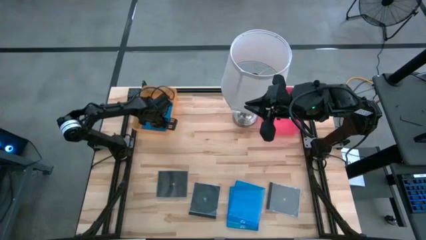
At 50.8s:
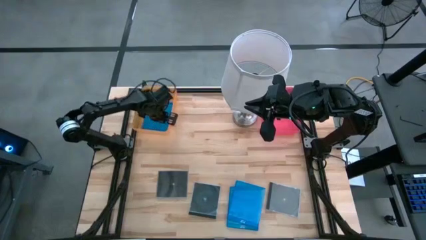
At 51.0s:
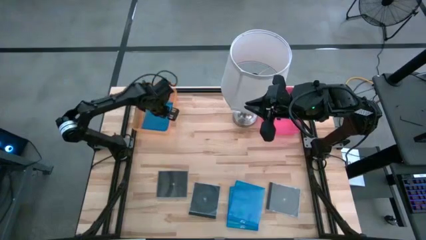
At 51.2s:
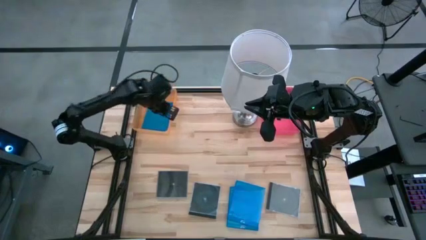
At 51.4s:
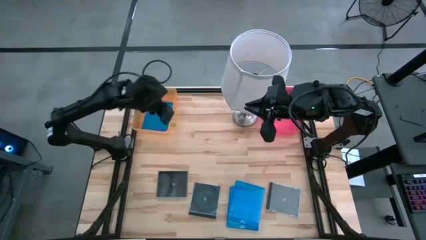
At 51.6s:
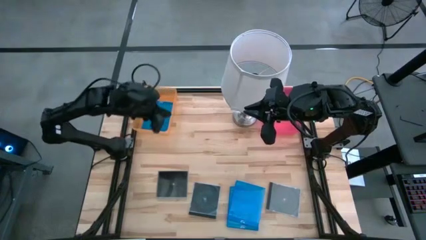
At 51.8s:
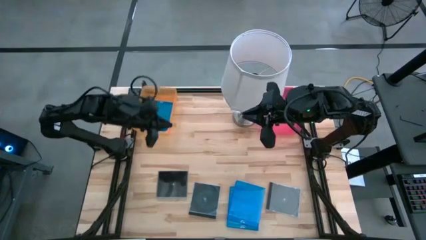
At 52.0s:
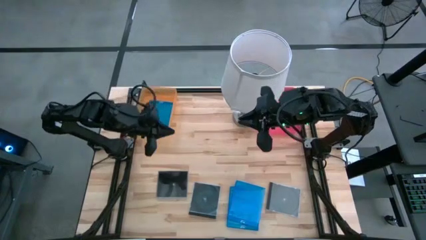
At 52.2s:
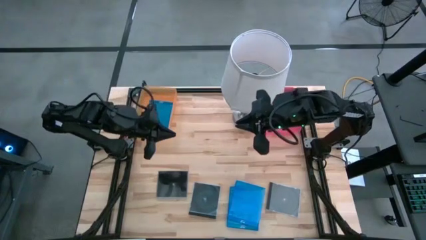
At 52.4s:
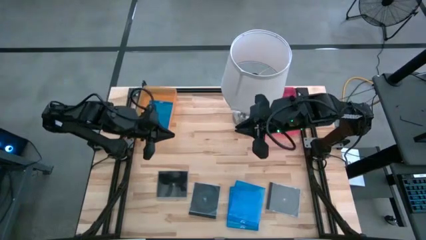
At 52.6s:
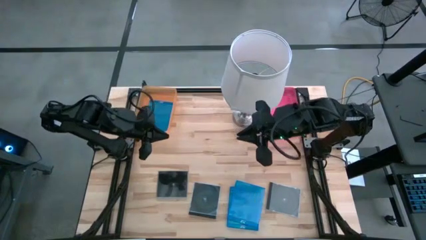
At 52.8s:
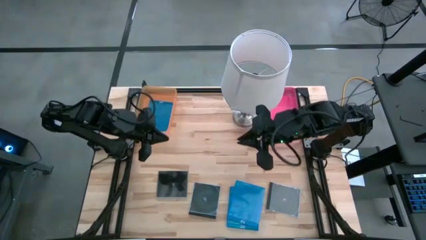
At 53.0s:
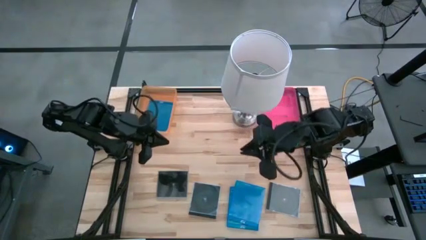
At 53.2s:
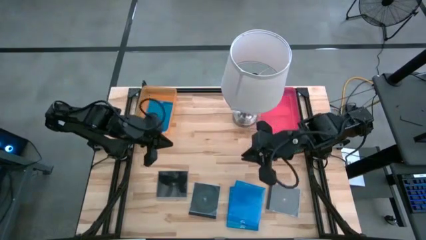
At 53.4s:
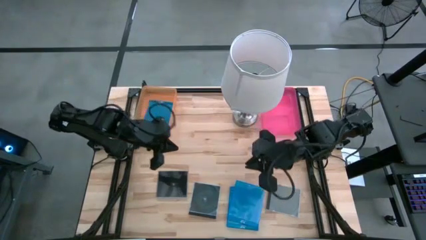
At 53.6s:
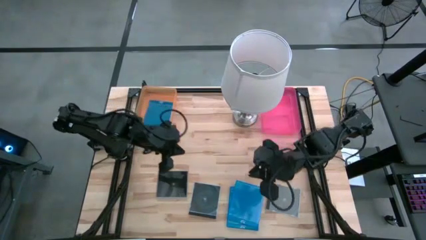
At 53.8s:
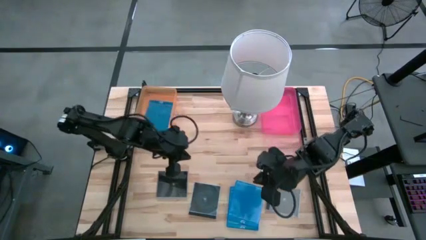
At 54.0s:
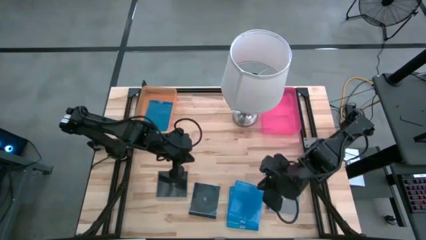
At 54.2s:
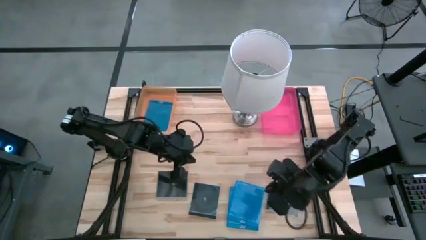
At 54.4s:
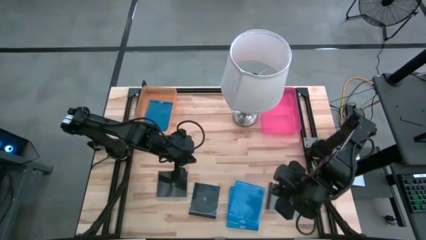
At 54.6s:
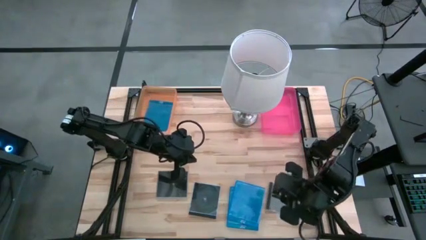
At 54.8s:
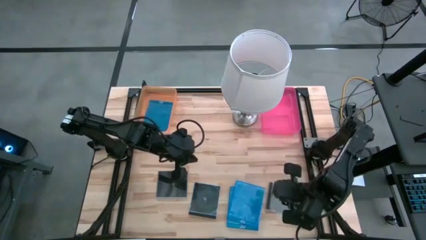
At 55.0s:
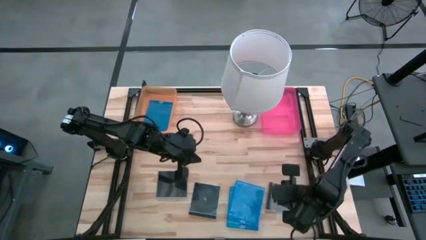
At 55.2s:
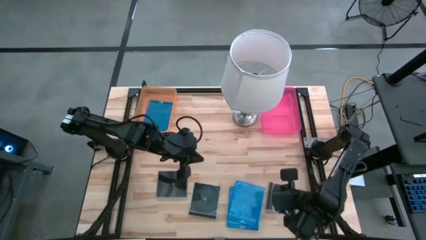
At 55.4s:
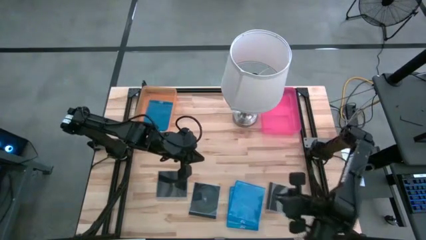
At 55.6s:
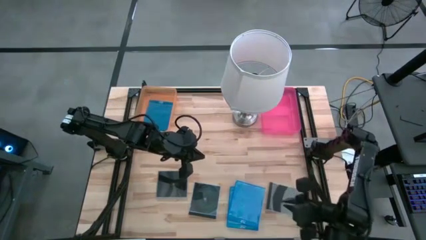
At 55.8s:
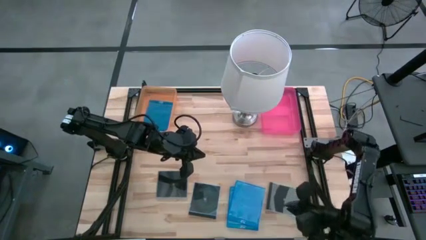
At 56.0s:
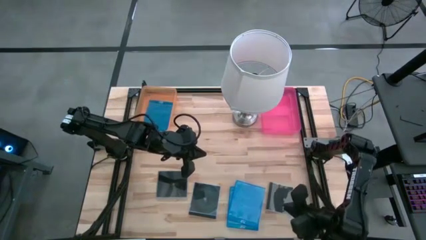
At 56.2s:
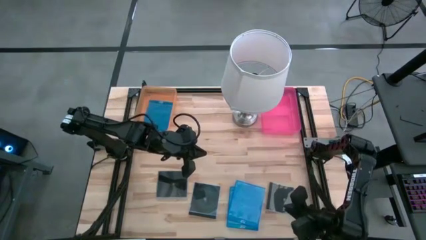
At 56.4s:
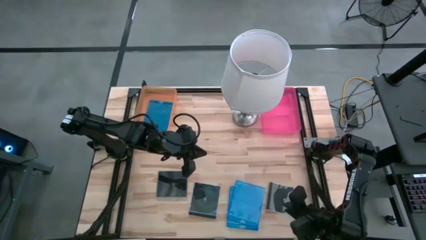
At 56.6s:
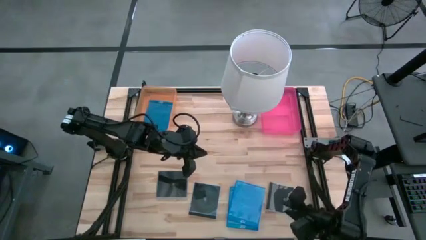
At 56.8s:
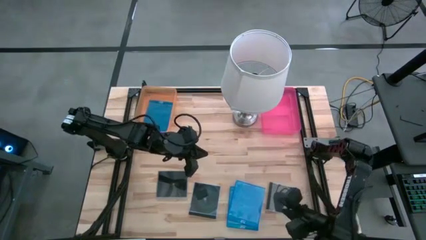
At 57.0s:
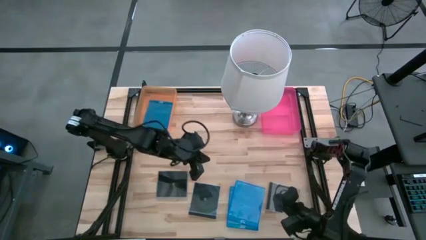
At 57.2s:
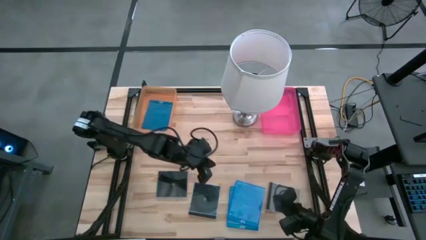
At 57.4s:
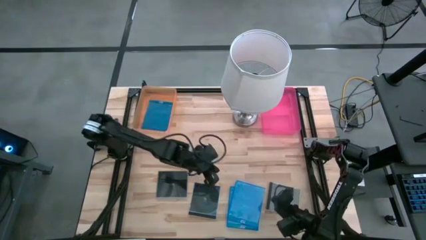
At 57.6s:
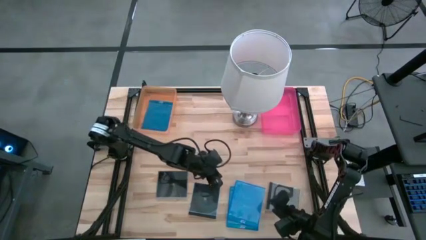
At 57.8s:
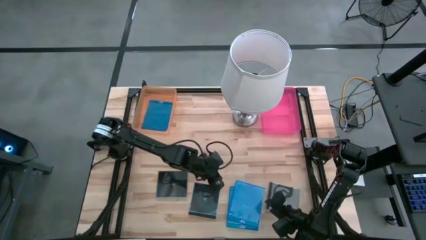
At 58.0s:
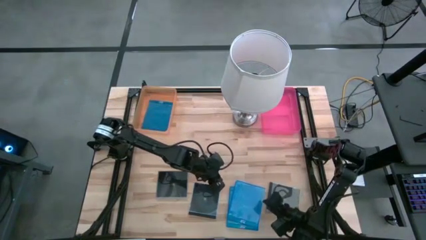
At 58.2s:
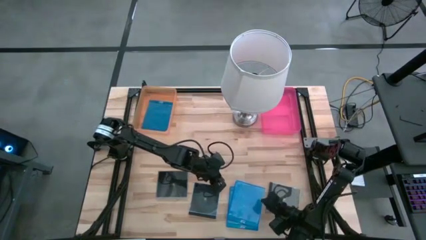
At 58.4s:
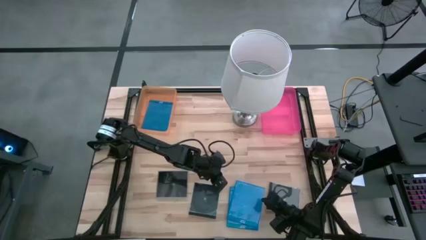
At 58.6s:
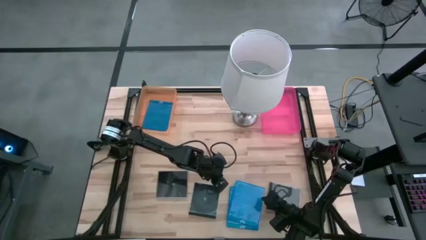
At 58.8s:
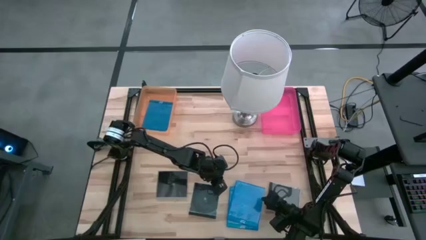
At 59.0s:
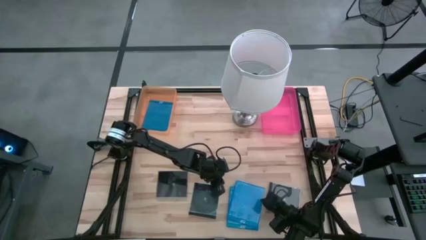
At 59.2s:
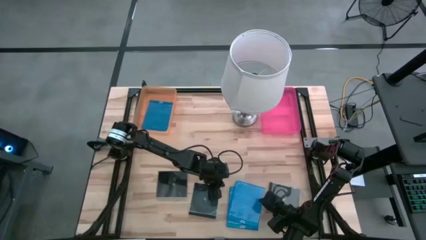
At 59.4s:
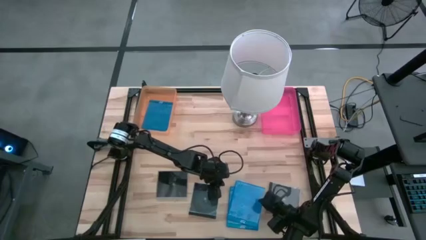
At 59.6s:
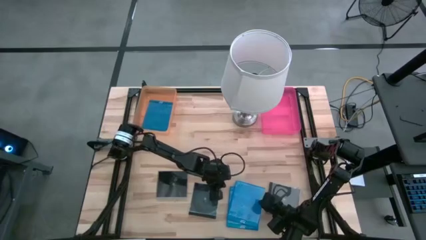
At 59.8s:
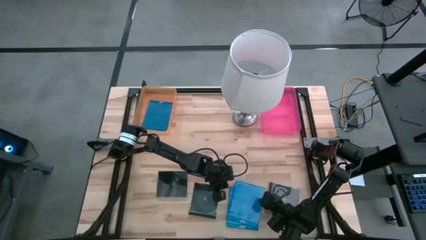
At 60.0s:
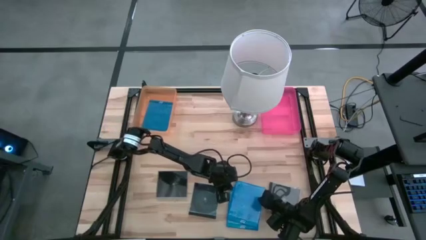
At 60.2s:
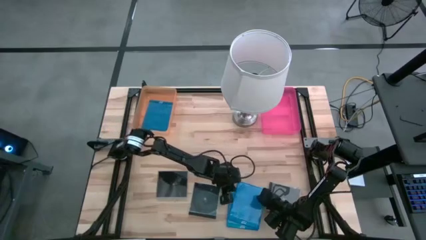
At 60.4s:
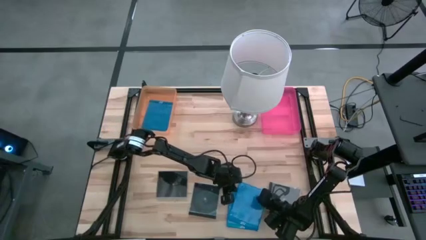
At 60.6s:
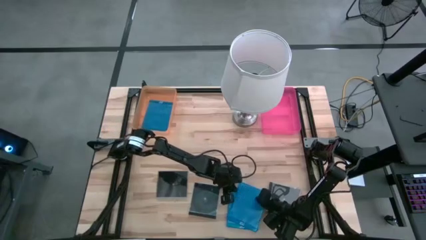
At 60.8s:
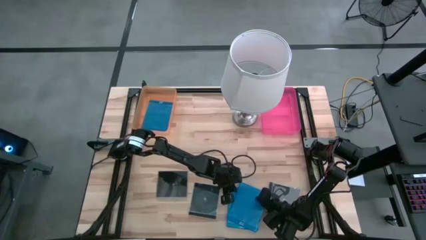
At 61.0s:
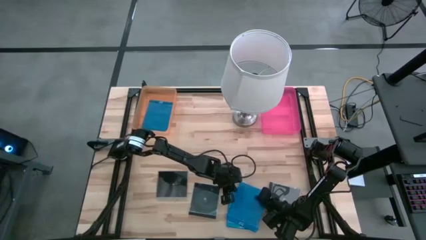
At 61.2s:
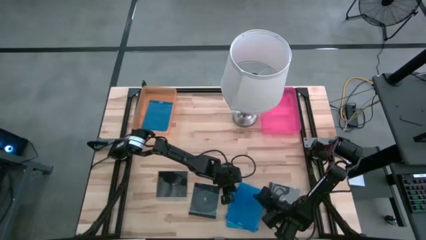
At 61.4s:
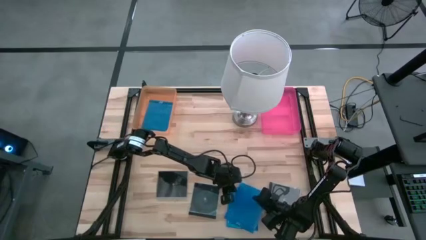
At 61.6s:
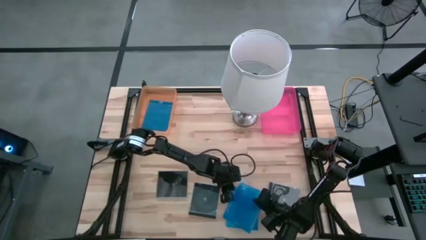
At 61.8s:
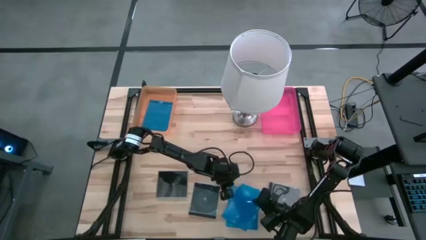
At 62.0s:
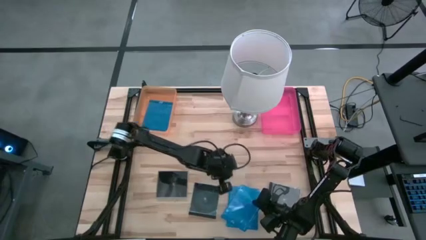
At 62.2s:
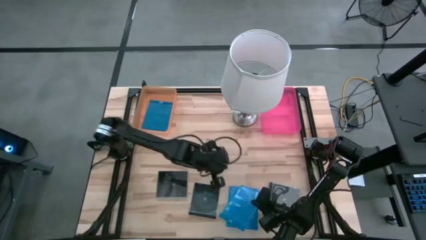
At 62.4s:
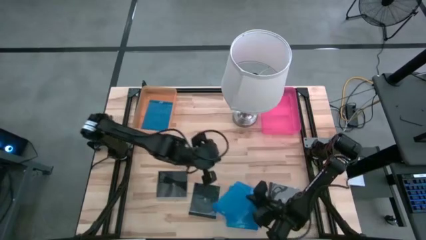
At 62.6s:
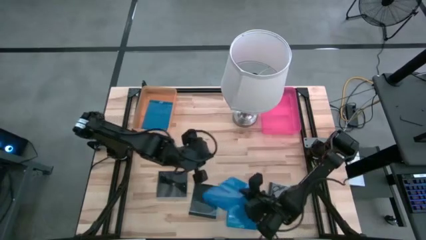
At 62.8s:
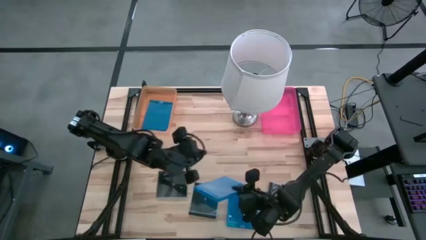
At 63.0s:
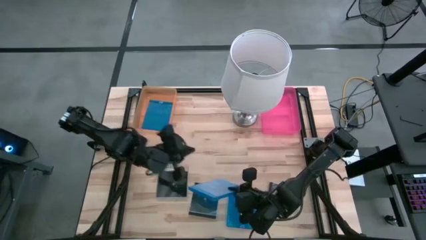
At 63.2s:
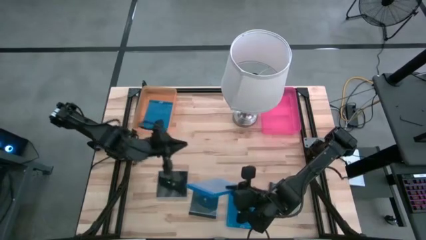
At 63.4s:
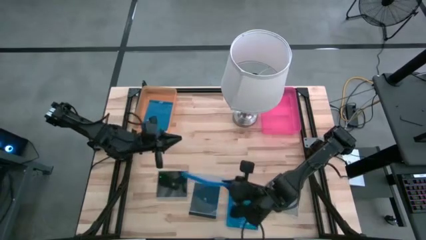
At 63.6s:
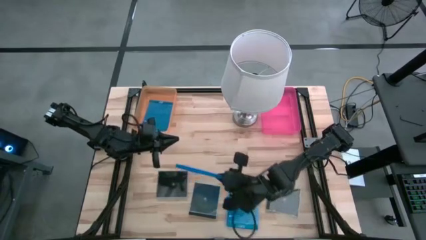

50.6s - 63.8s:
Task: Pick & place jewel cases by type
Put the blue cd case into the orange bin

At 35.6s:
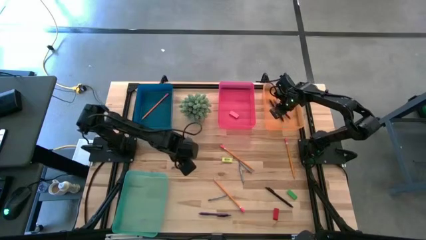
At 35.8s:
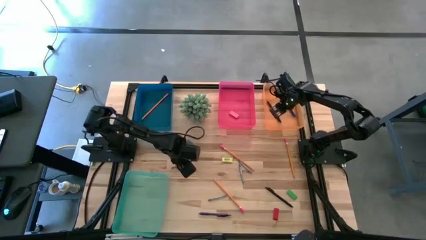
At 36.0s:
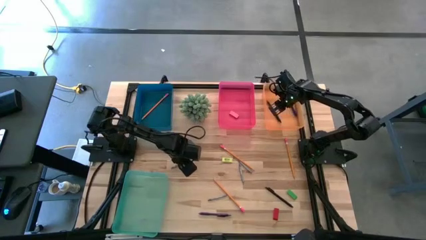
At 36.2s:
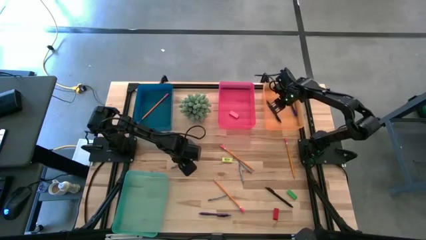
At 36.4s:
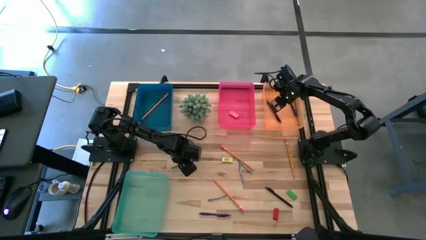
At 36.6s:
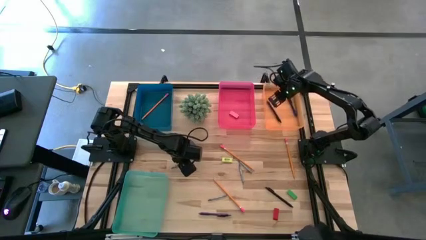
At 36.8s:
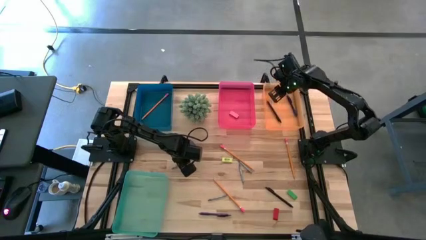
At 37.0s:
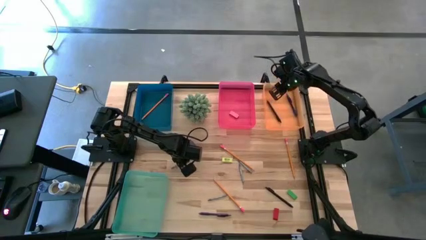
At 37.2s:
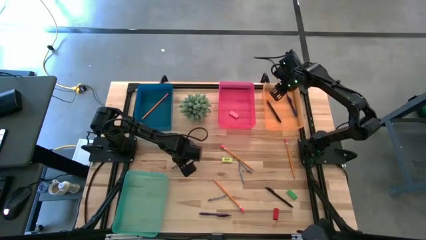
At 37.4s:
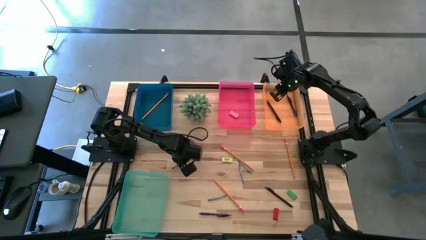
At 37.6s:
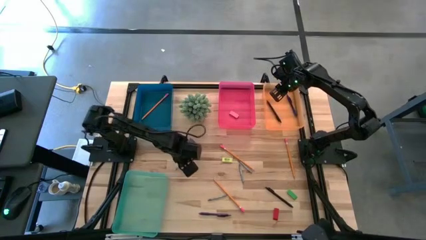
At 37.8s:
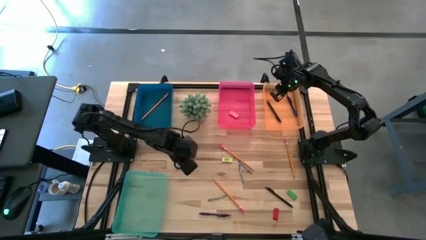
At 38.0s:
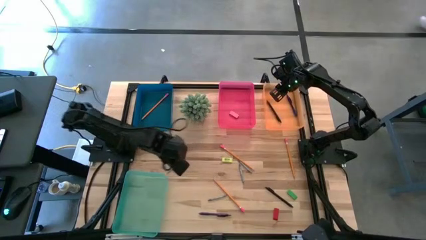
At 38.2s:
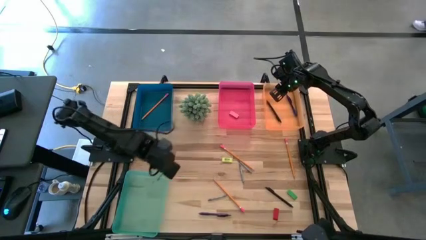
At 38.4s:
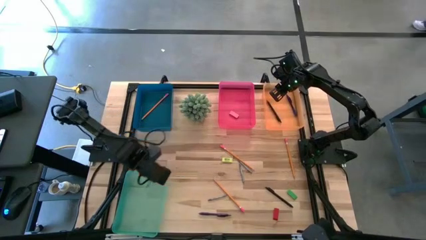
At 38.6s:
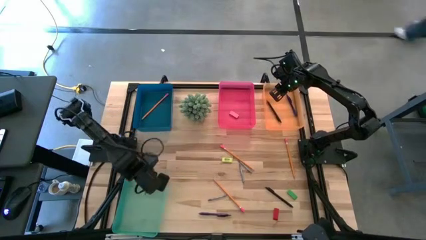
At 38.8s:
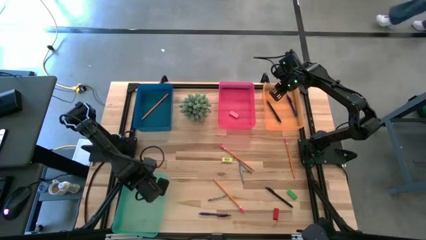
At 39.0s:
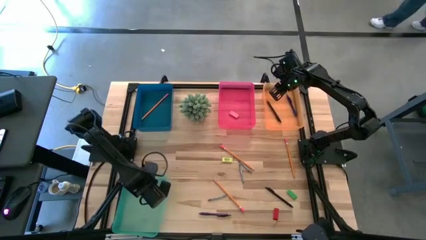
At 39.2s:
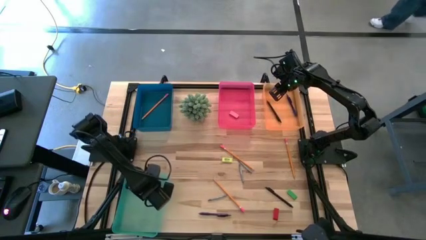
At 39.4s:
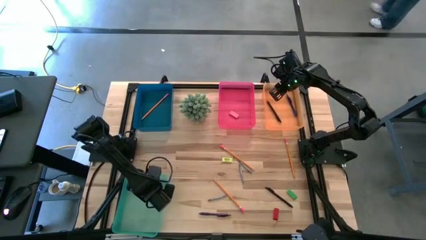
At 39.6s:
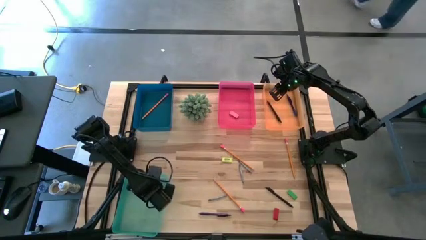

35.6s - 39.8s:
Task: Sort crayons/erasers/pens/pencils in bins
Put the gray crayon into the green bin
